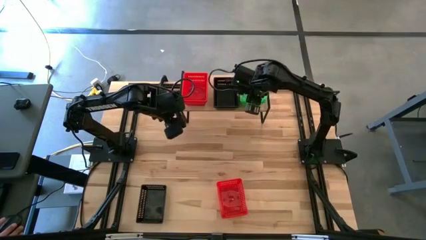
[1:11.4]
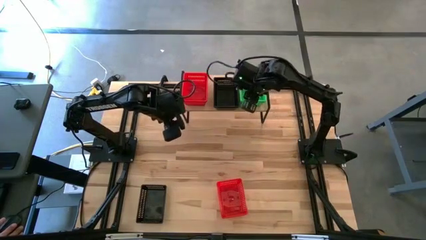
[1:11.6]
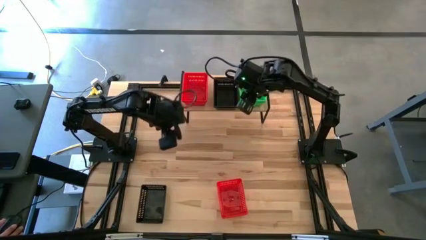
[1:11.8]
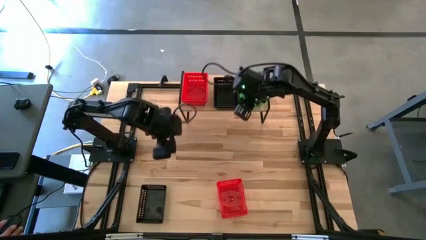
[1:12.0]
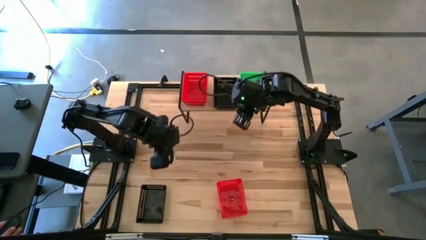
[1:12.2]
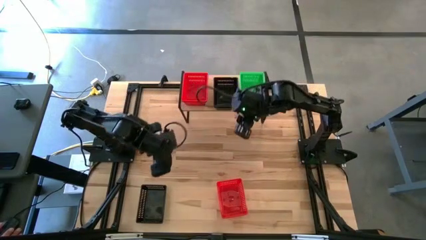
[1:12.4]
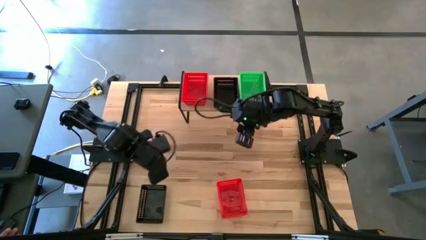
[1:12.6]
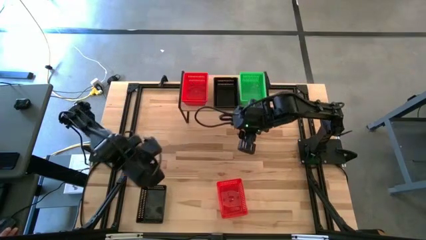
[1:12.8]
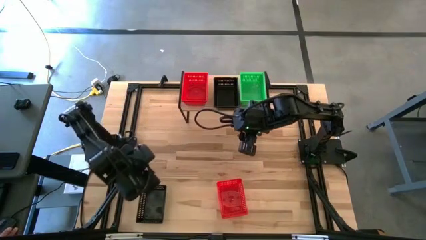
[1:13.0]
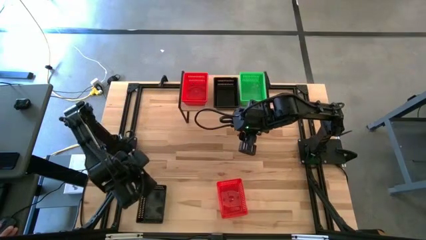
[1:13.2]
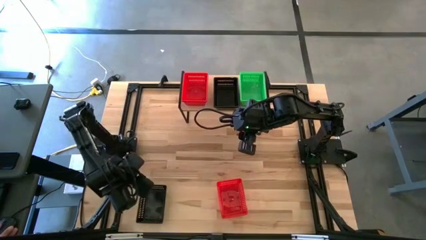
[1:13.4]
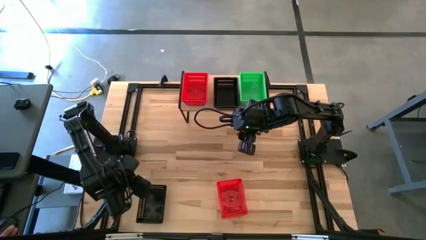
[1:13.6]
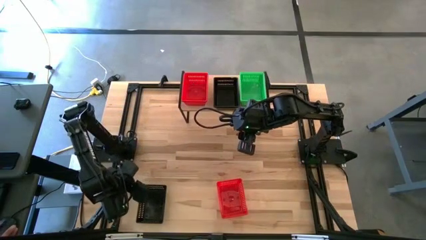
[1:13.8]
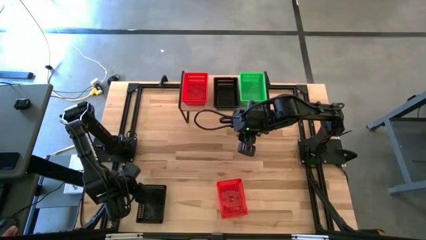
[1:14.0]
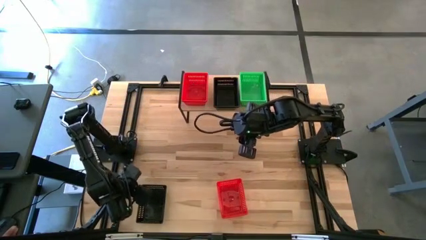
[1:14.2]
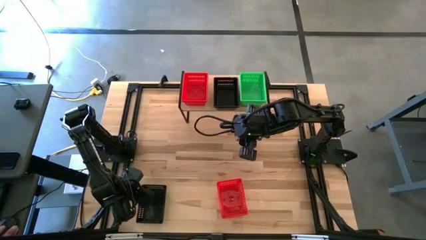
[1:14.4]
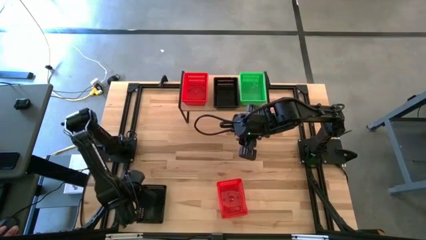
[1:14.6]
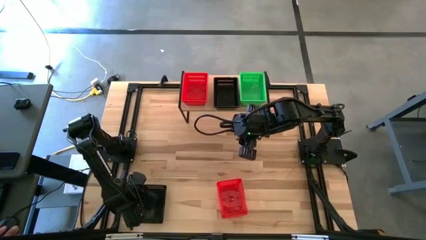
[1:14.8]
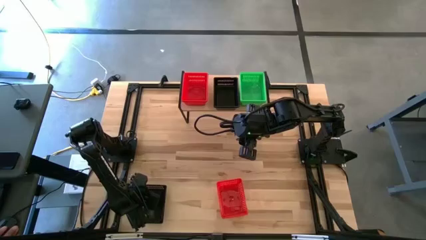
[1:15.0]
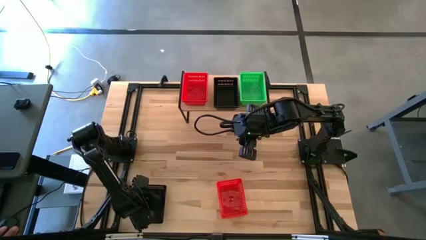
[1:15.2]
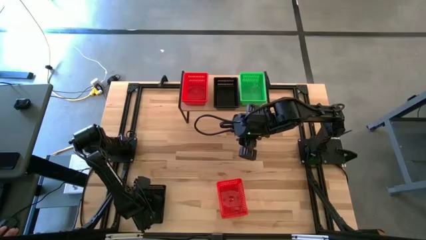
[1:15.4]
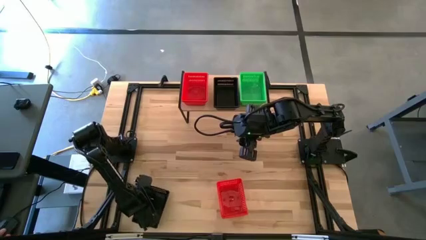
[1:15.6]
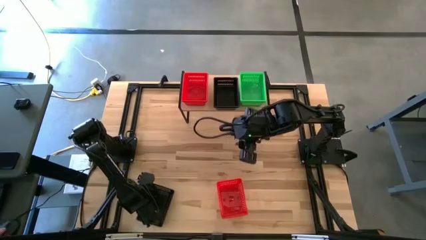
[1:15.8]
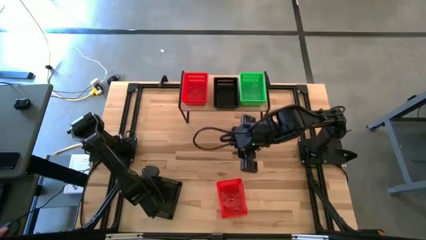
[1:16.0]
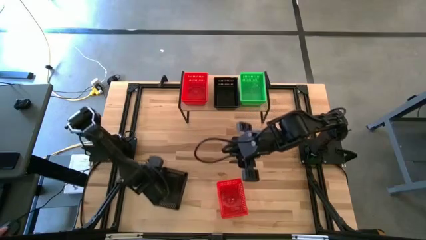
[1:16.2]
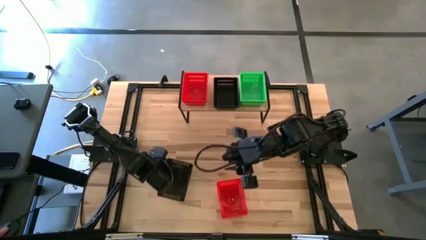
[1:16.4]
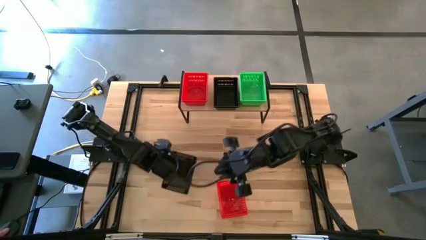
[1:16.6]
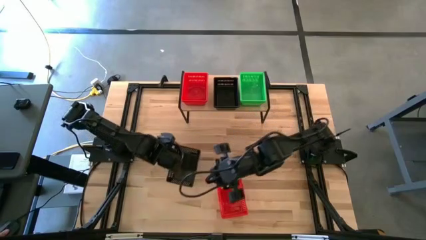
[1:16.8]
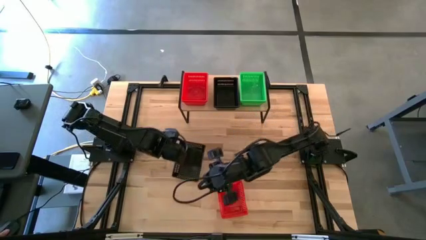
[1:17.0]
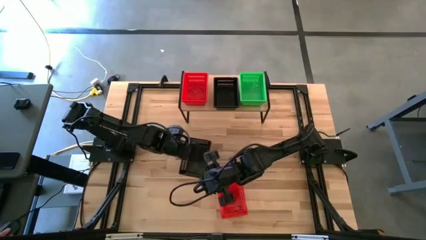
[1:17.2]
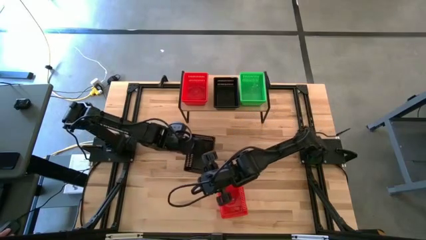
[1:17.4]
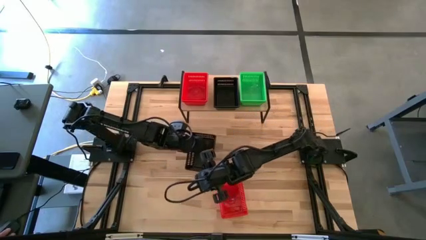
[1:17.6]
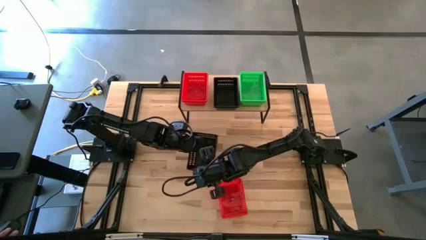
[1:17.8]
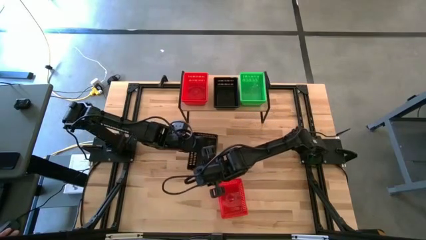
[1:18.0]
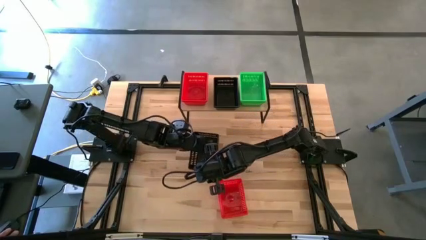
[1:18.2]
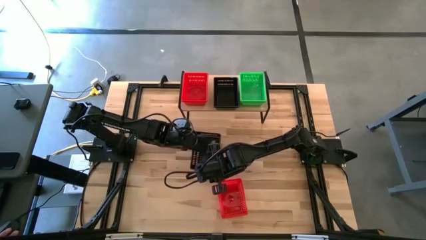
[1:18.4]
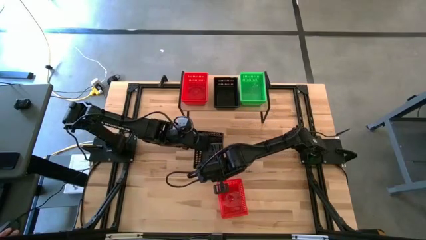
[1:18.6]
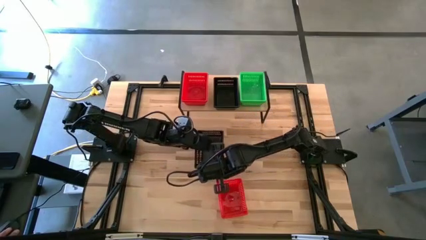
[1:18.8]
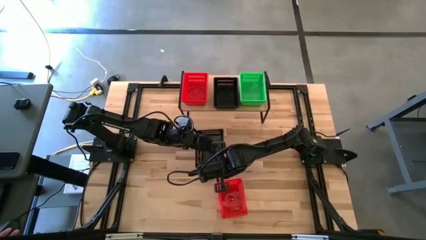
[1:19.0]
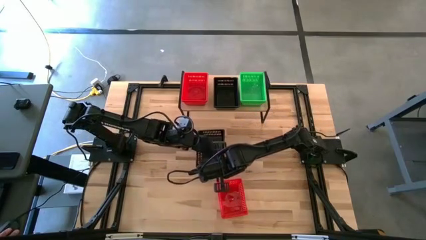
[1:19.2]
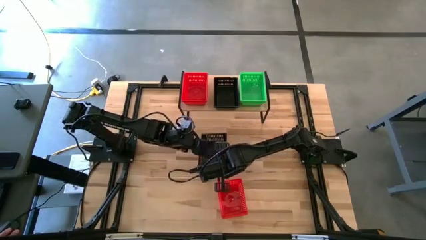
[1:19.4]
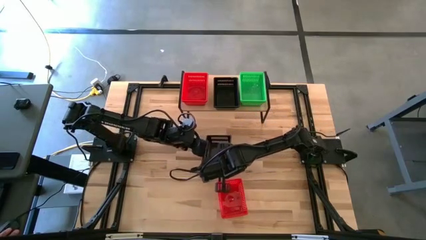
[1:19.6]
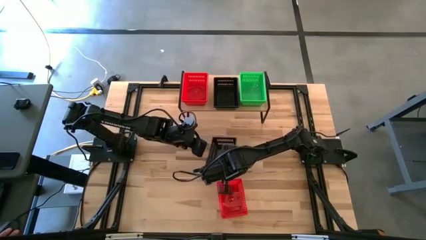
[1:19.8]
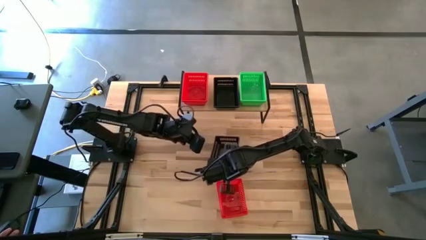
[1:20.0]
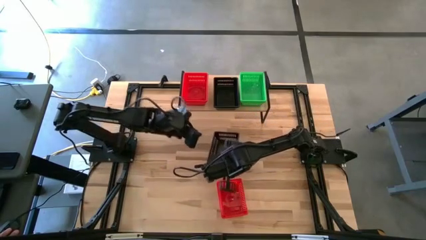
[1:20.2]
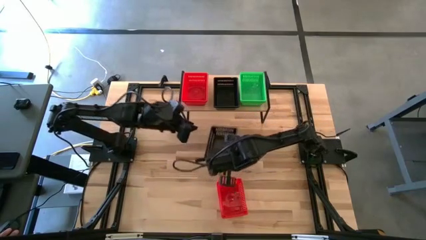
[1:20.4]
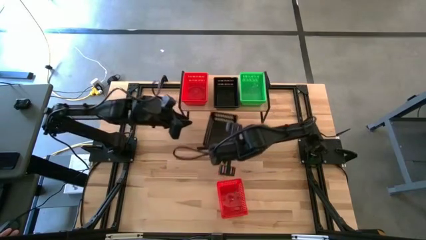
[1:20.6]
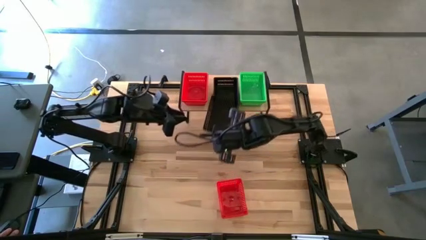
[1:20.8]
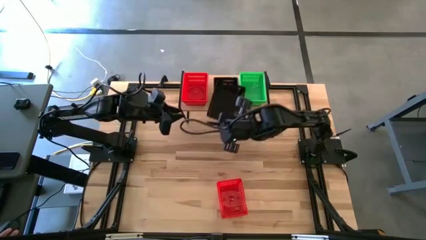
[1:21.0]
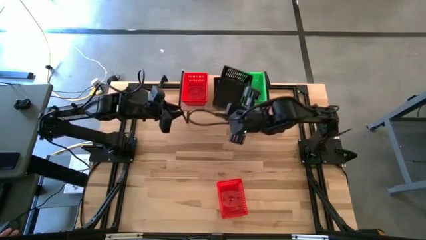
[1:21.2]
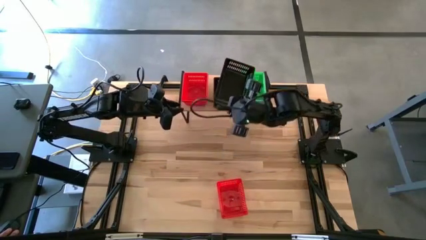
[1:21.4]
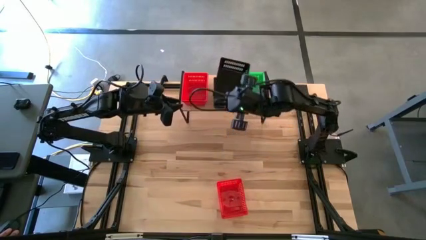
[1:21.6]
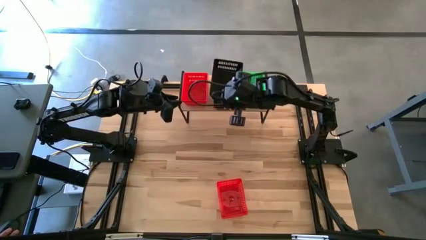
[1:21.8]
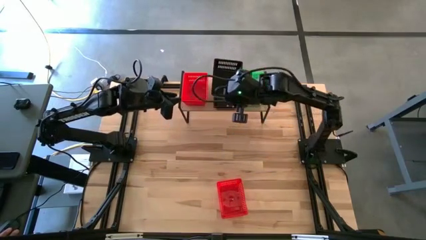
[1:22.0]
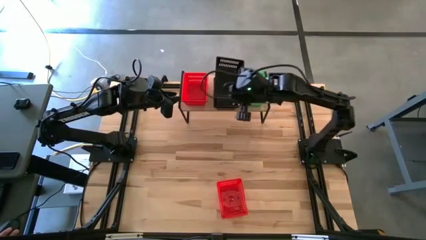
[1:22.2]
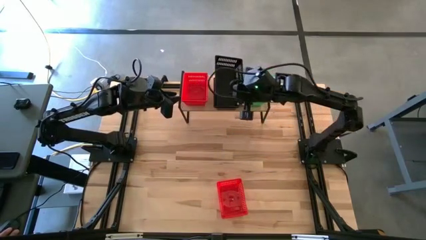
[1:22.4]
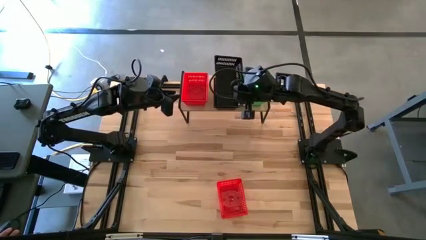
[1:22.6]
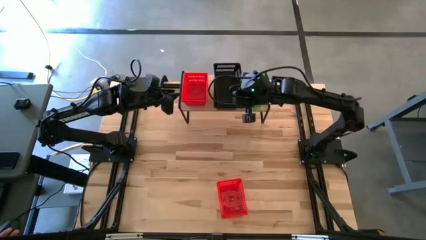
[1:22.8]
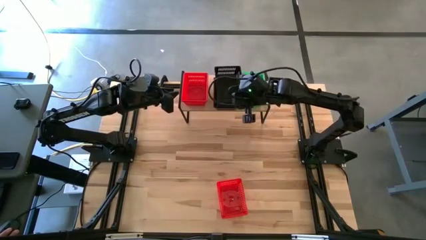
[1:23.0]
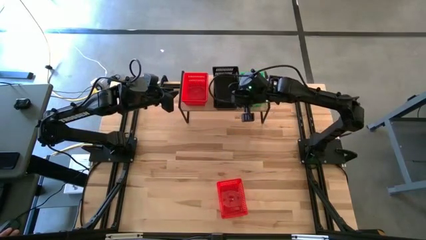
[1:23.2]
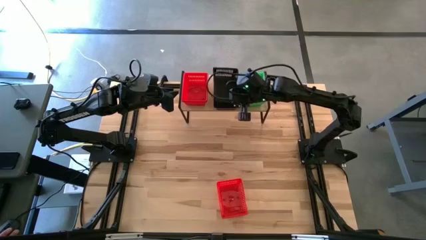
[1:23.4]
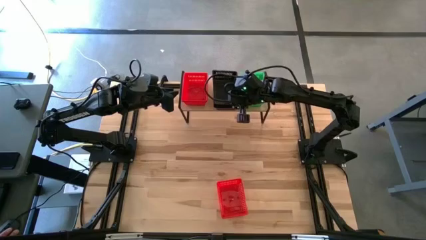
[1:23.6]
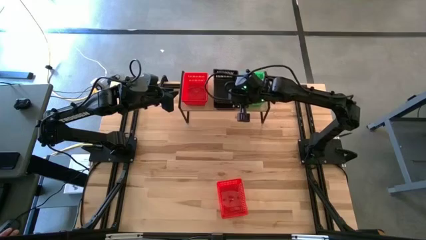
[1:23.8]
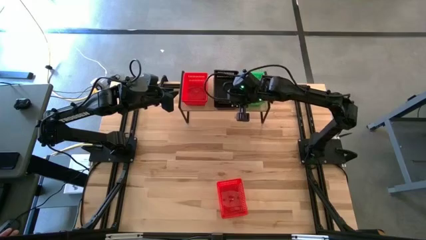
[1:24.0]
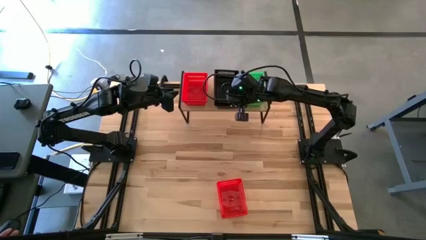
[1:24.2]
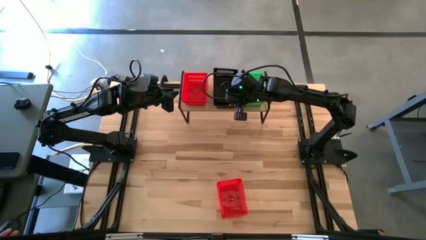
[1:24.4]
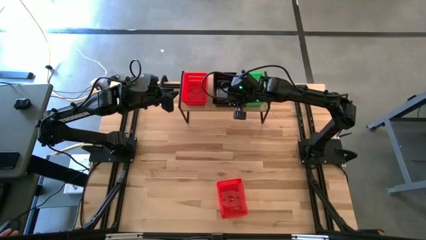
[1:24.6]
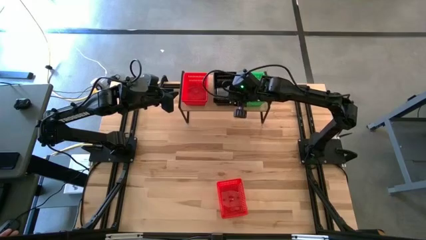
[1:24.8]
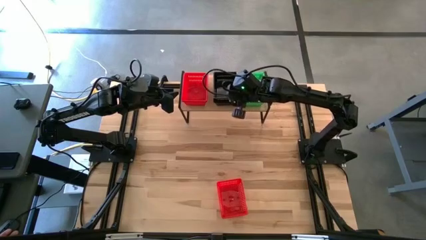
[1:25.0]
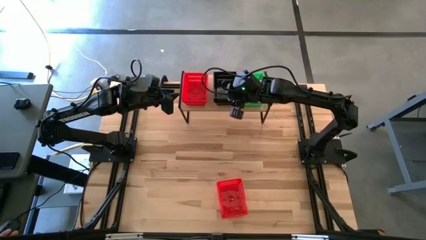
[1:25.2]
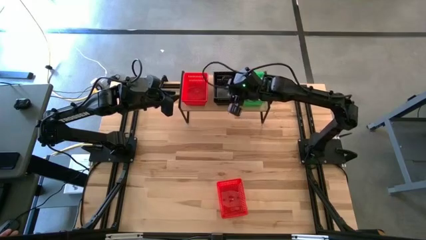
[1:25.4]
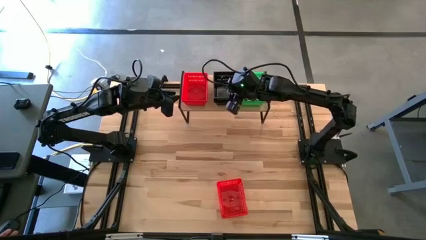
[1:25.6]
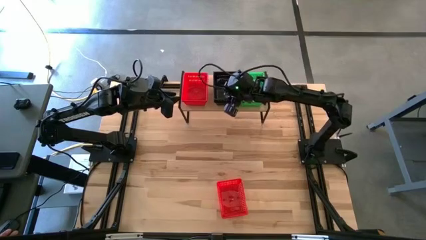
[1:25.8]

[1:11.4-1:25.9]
Task: Stack baskets on shelf by color
Stack the black bin on the stacked black bins on the shelf
